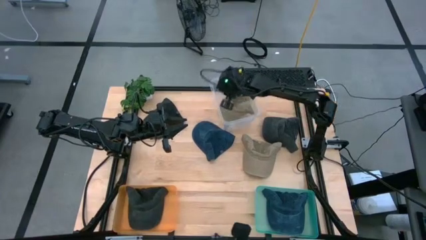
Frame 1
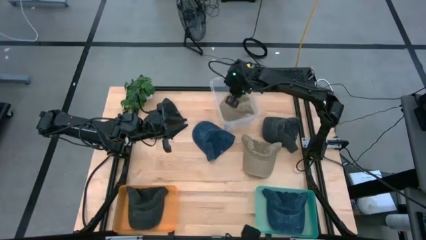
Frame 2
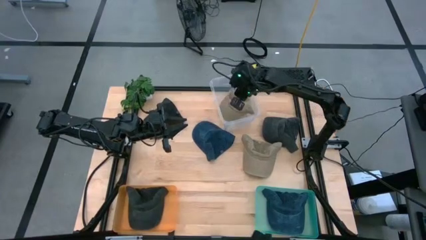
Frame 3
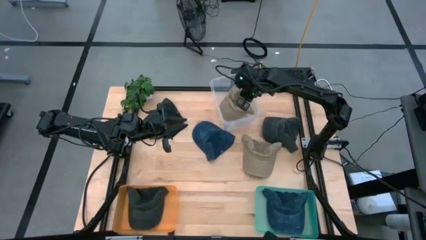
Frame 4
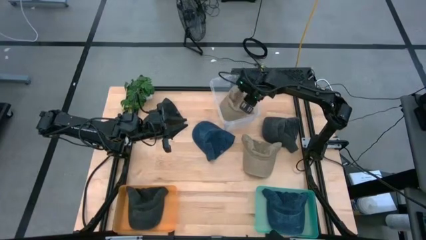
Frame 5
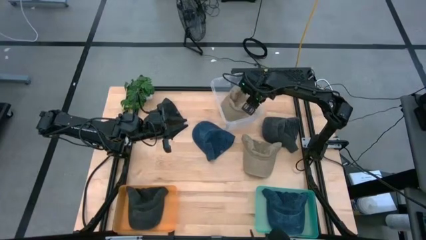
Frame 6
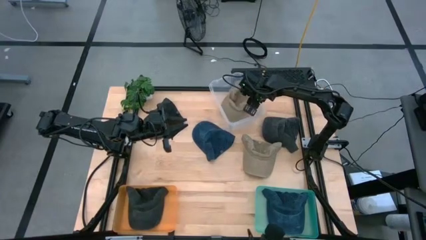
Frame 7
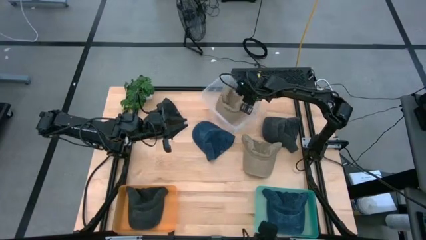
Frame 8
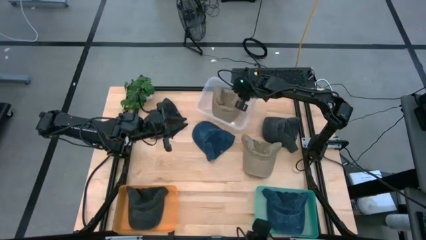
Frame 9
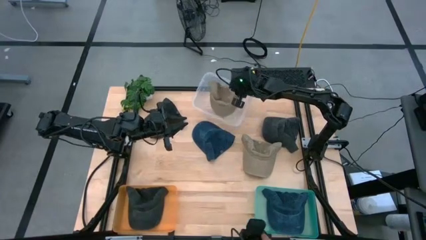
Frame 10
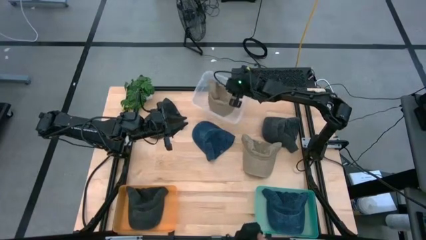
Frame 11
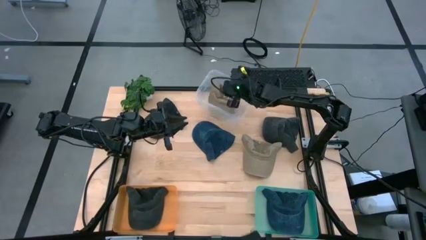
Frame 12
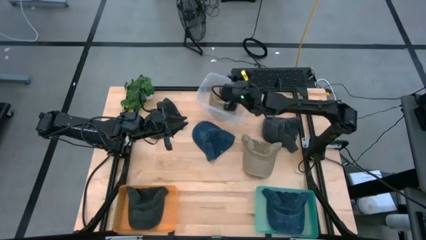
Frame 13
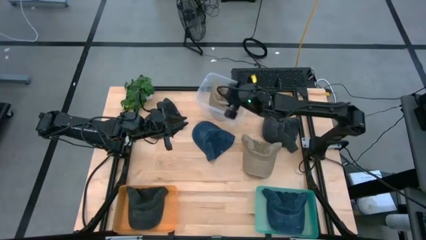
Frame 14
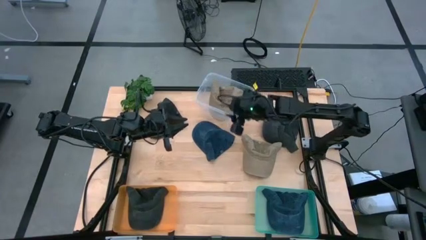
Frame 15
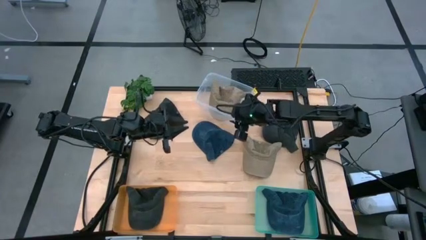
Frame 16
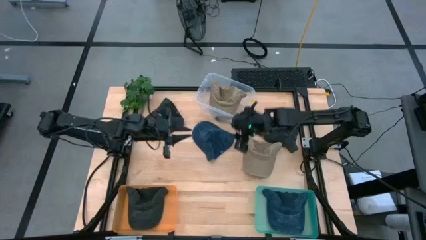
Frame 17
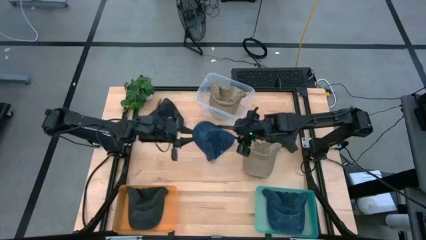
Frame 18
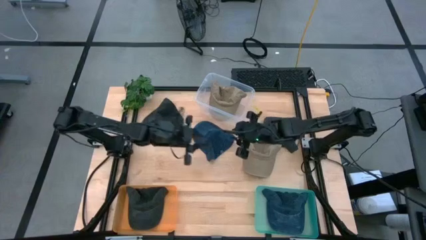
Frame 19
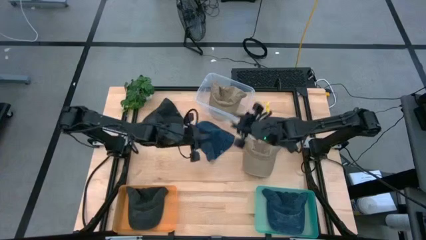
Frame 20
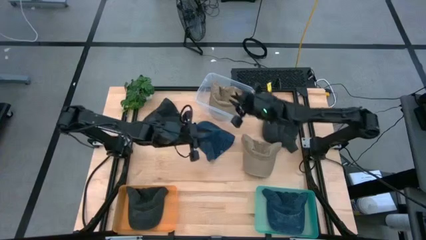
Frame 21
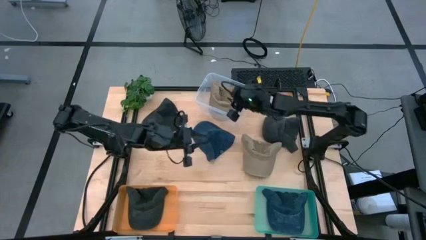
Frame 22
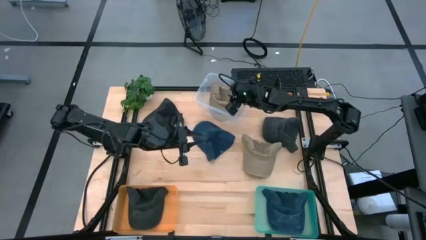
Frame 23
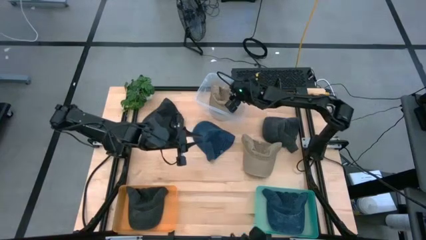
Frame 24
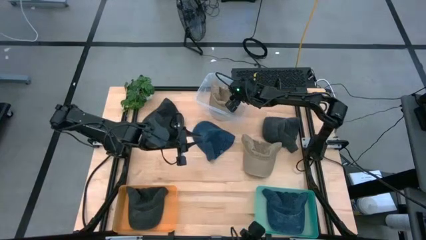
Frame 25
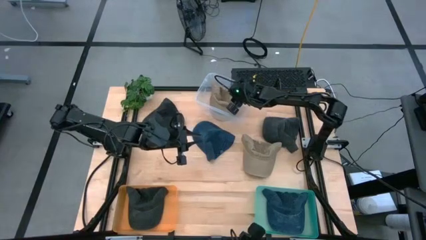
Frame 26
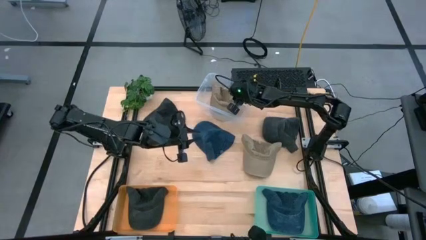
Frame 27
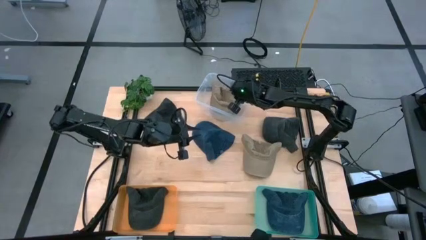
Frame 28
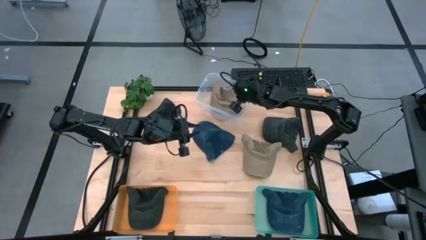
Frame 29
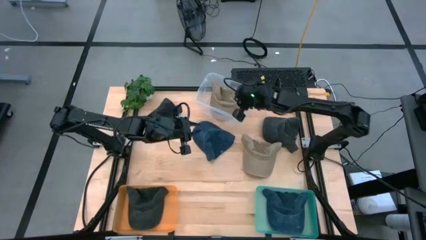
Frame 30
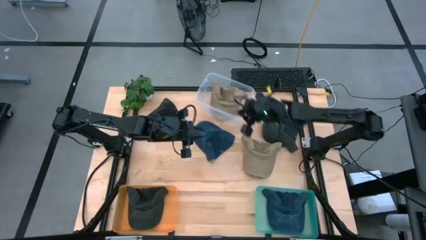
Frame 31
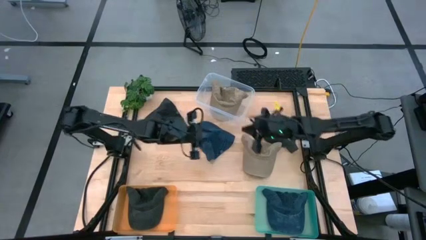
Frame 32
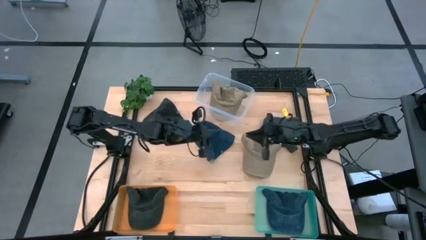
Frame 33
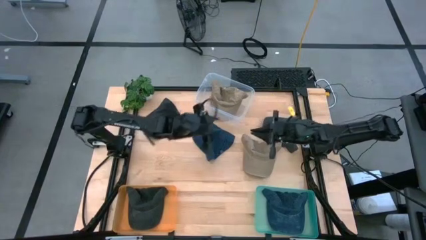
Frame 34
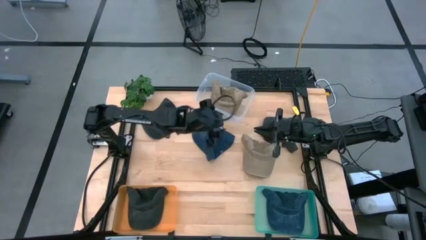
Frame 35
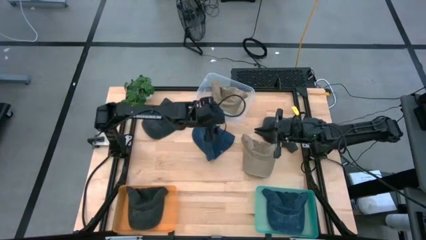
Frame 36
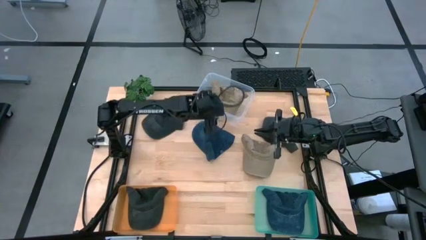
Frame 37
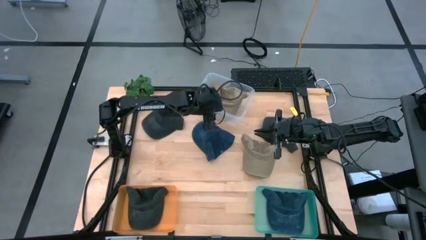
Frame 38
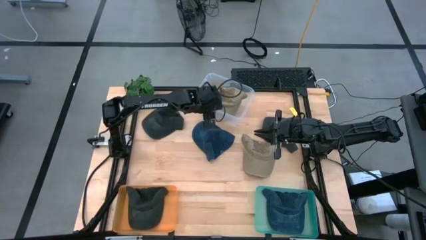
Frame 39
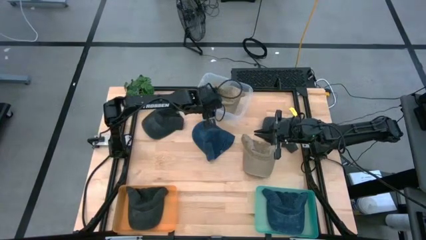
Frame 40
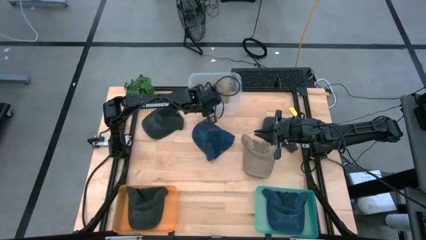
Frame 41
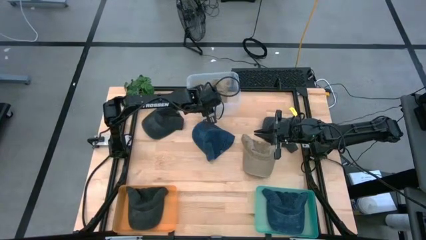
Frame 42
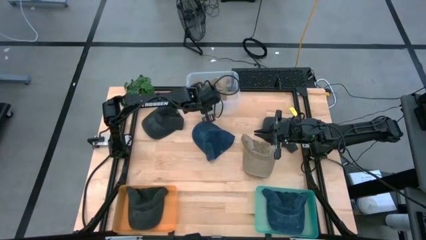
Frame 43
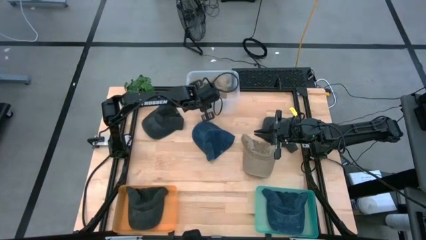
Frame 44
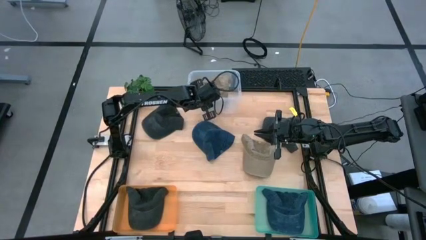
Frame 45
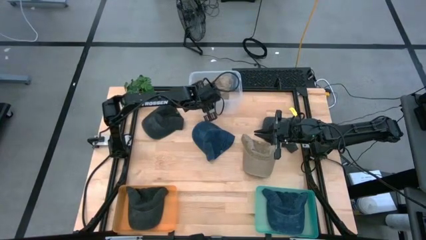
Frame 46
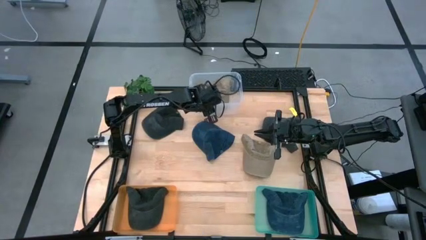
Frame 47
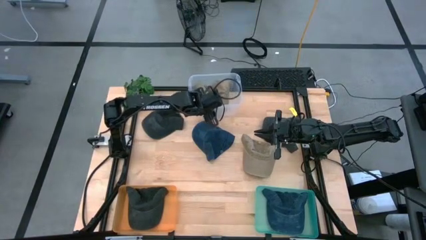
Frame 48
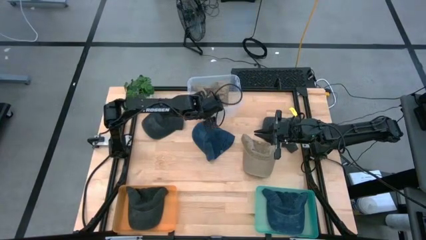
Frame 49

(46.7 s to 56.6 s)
Task: Pick & Place hat
Adjust the transparent bin

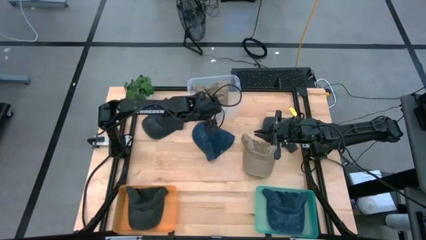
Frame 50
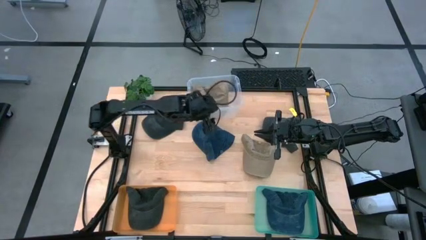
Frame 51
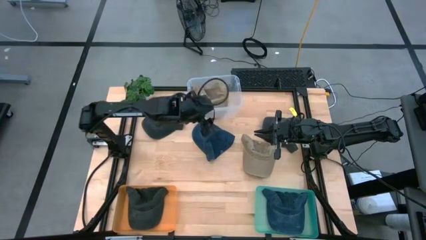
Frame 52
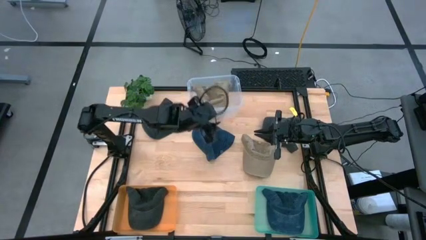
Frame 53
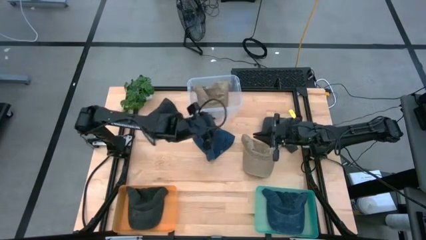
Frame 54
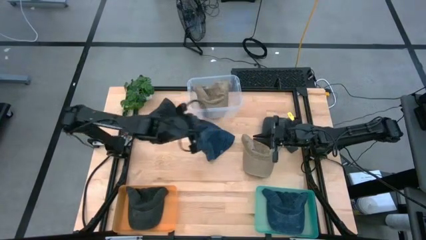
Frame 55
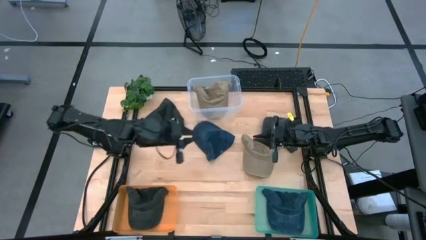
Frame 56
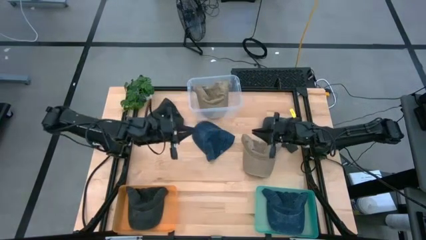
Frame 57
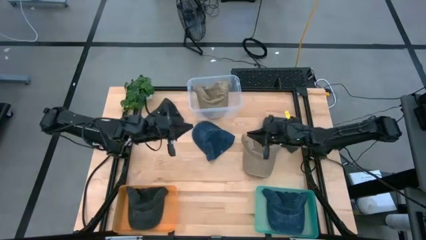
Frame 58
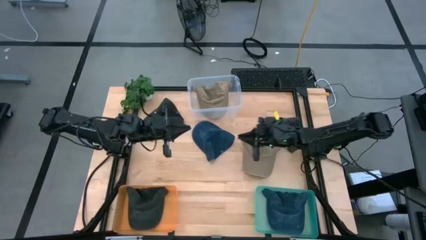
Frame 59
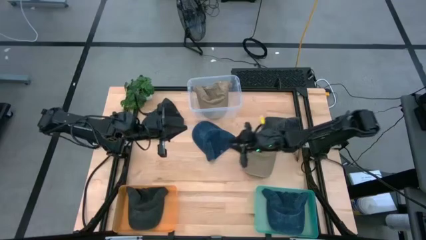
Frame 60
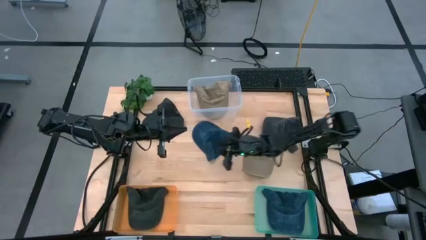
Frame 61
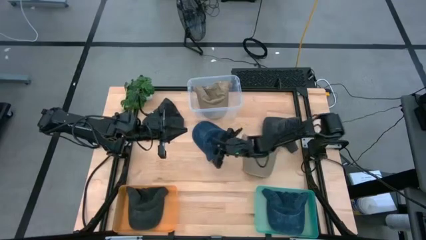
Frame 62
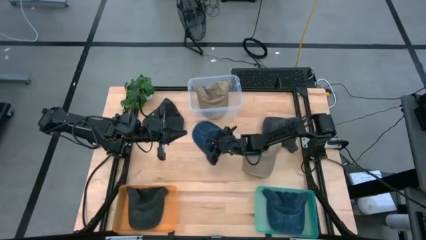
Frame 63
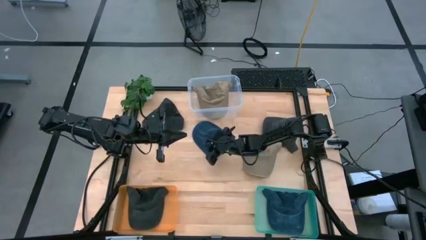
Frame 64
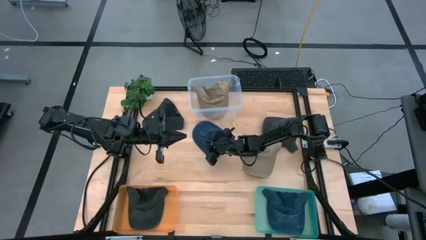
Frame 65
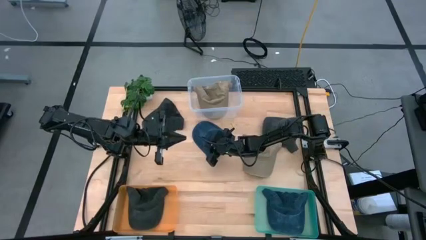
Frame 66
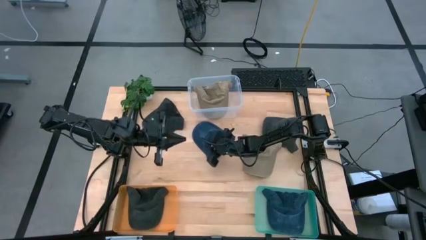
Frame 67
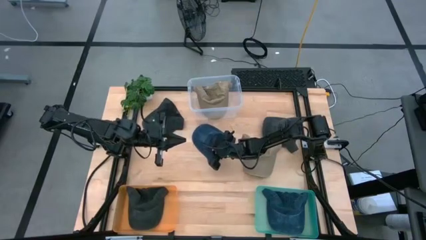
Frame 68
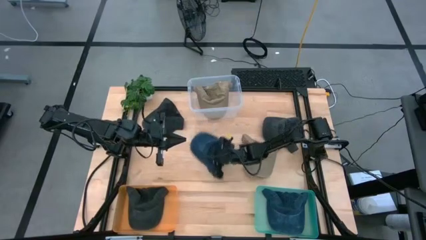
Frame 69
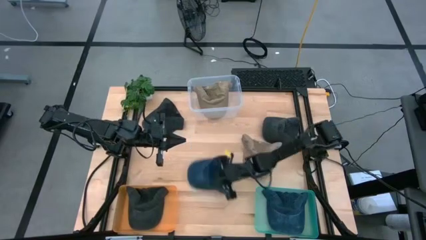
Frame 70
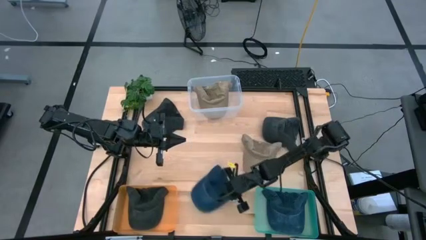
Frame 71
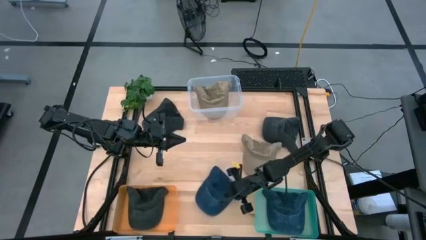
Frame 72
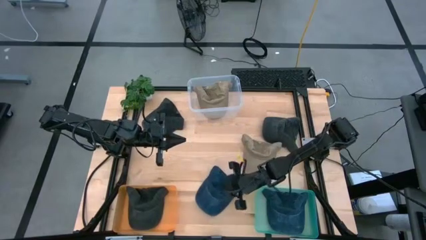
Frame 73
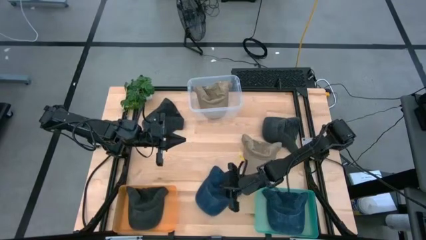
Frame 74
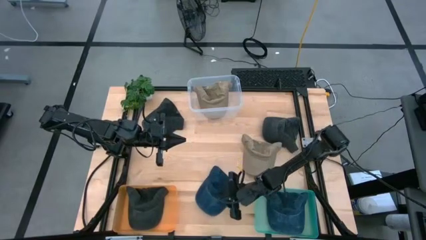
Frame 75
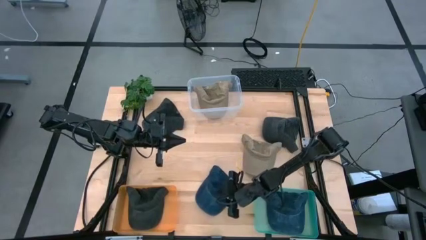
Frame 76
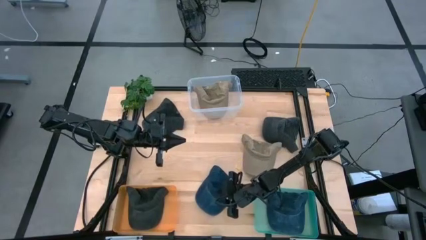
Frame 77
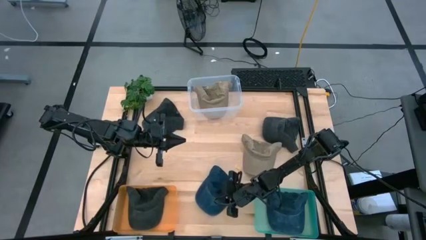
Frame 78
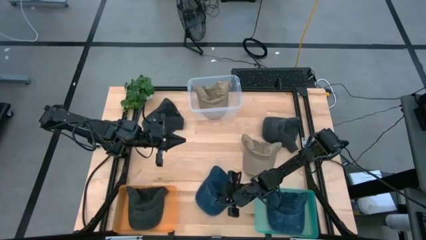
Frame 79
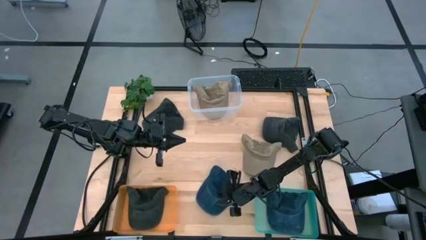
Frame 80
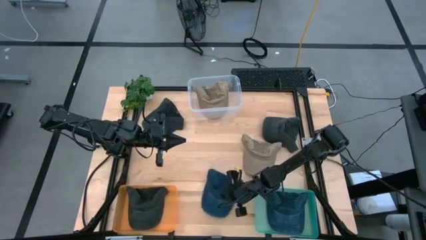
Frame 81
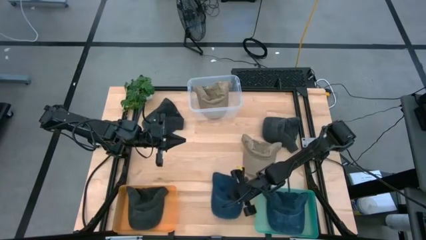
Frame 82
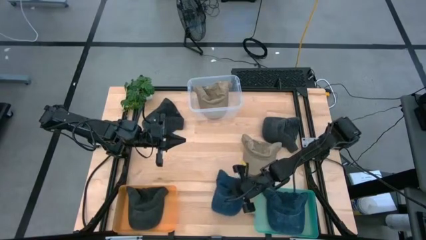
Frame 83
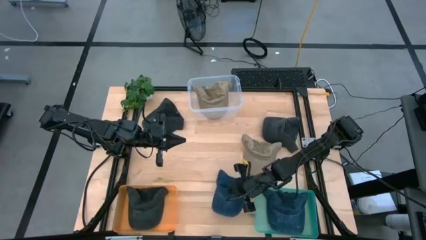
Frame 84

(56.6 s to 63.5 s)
Put the blue cap into the sky blue bin

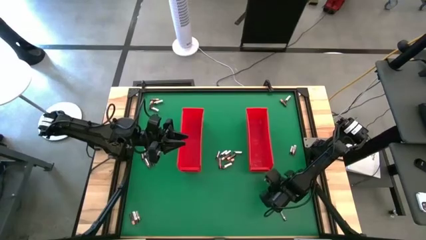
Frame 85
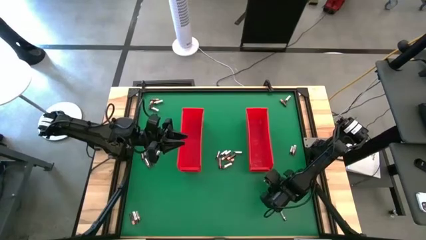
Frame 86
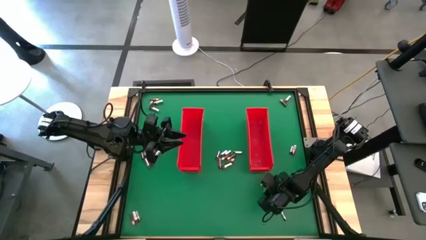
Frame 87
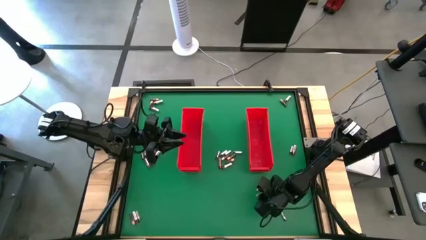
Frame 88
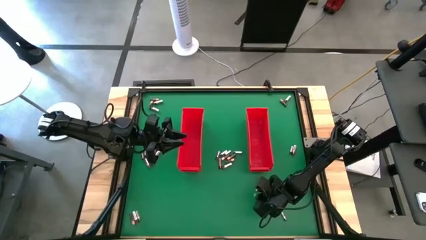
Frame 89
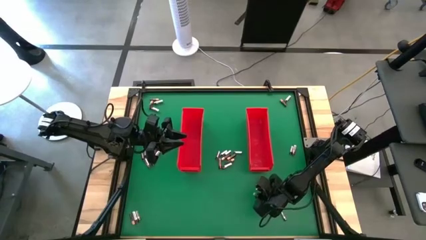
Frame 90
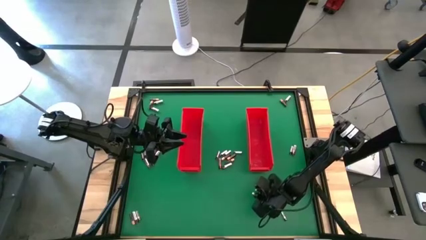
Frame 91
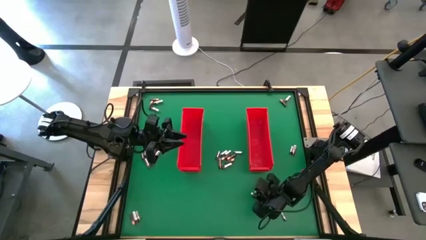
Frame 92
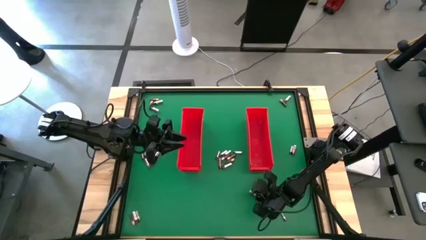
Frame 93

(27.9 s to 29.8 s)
Task: Sort batteries
Put the silver battery into the right red bin
